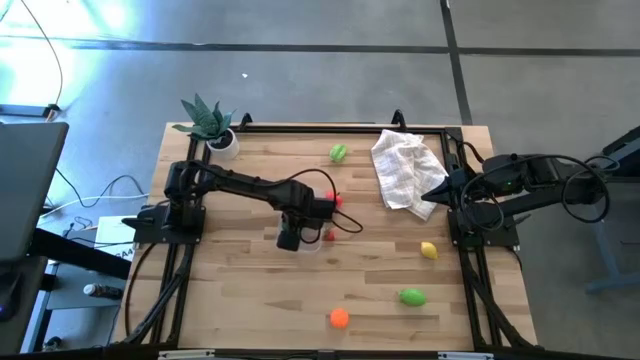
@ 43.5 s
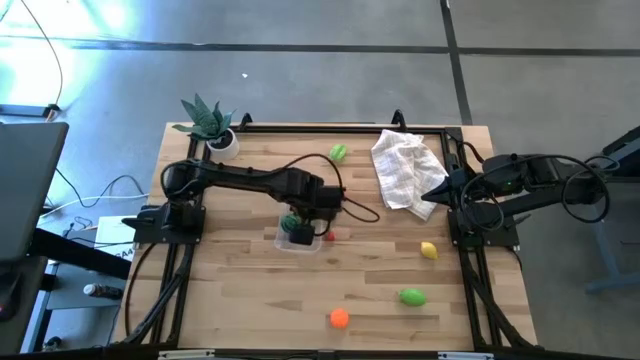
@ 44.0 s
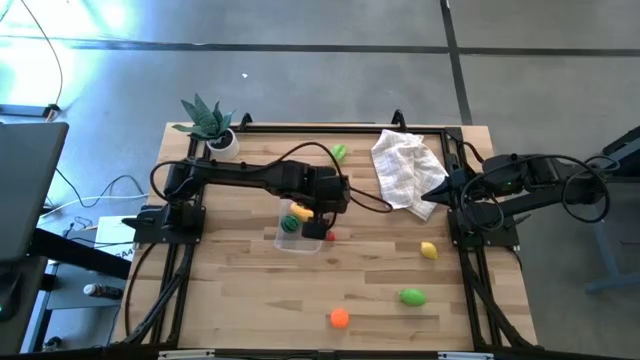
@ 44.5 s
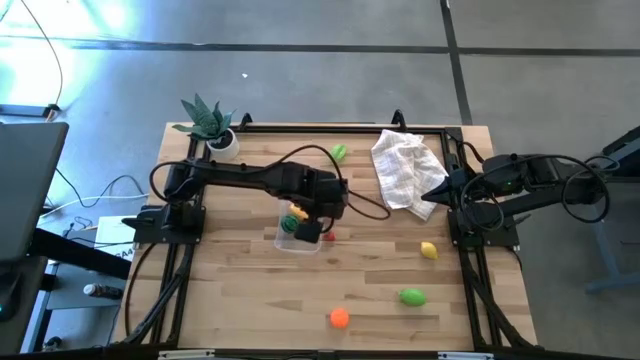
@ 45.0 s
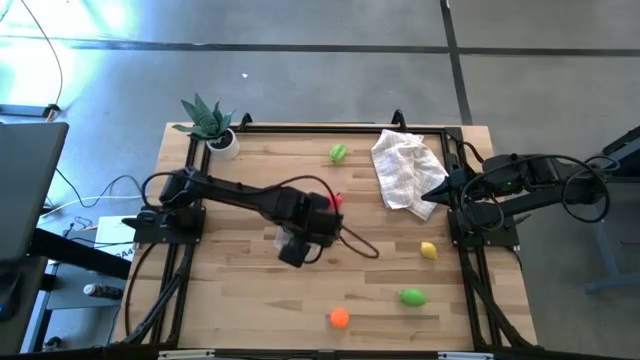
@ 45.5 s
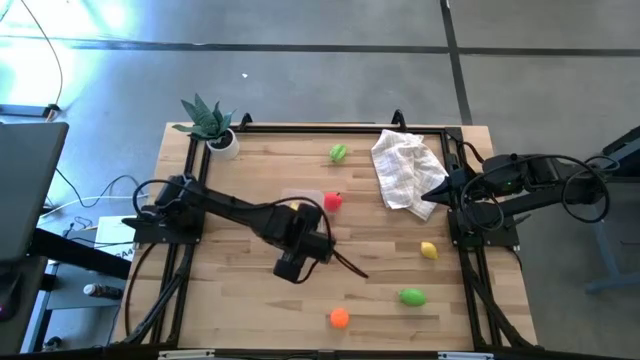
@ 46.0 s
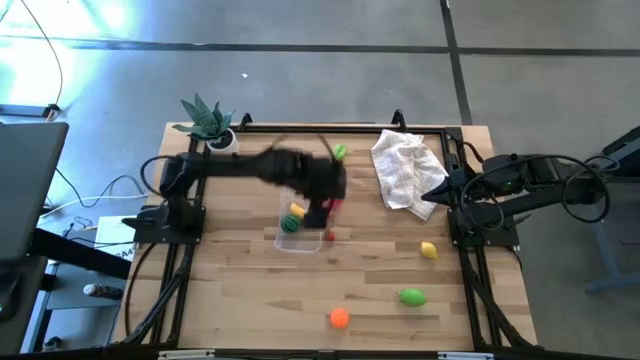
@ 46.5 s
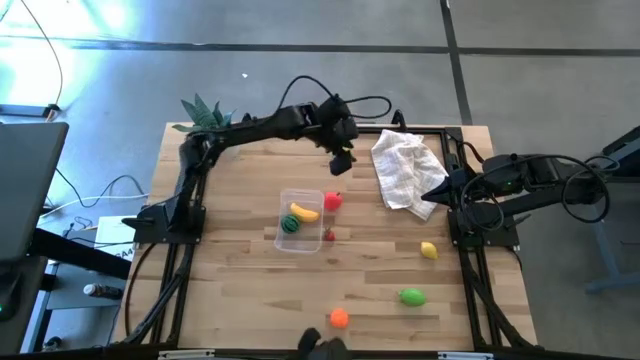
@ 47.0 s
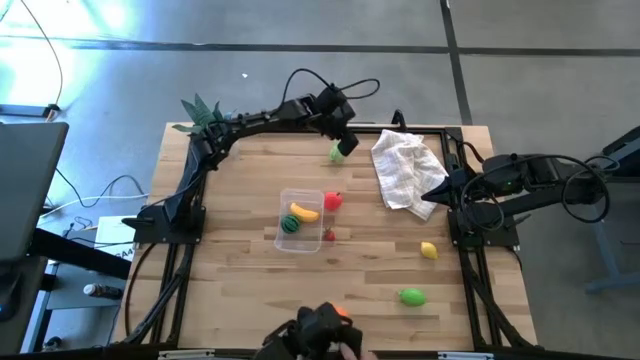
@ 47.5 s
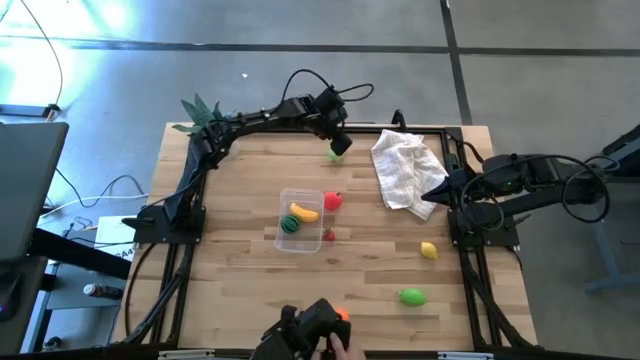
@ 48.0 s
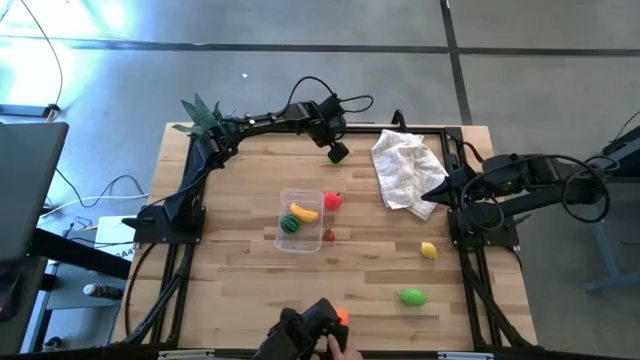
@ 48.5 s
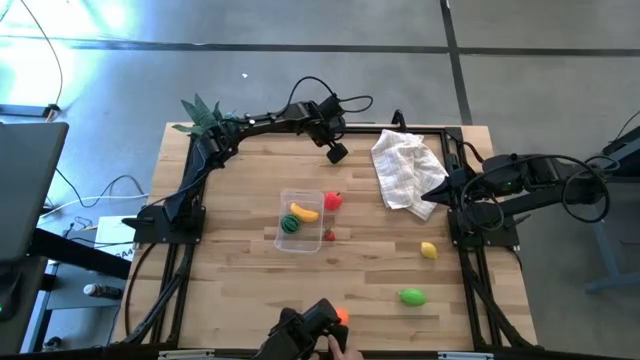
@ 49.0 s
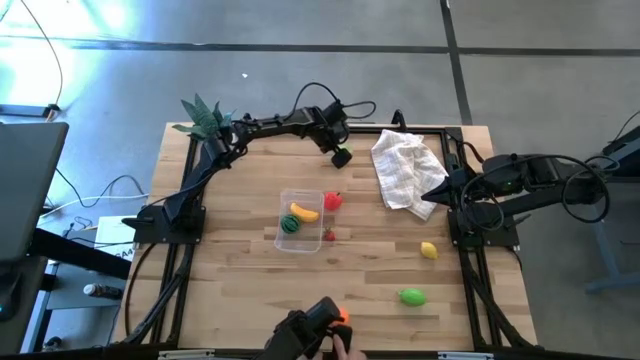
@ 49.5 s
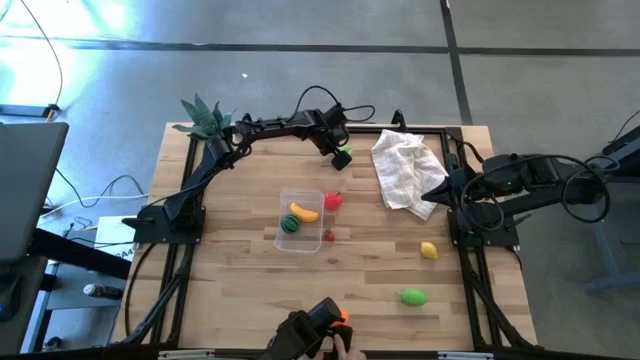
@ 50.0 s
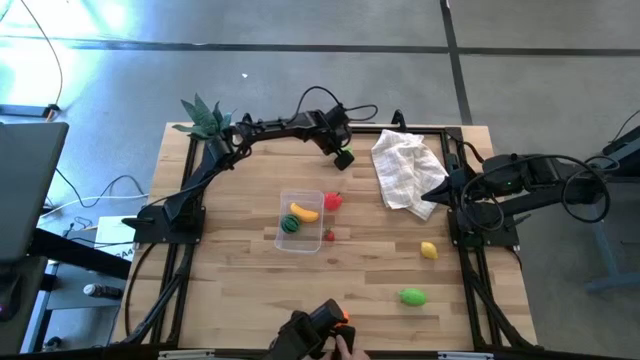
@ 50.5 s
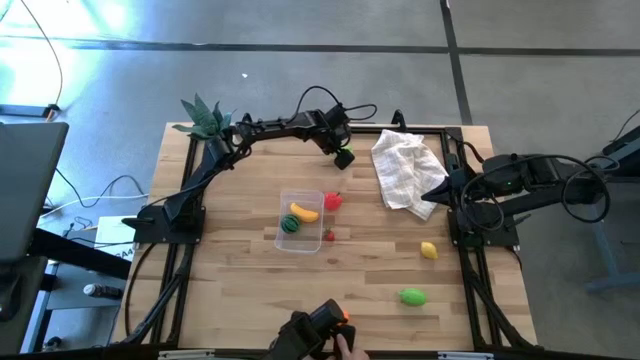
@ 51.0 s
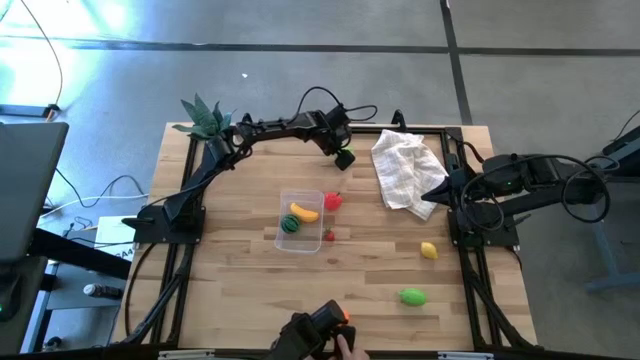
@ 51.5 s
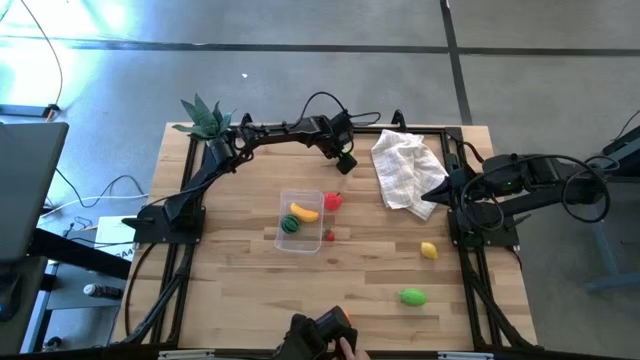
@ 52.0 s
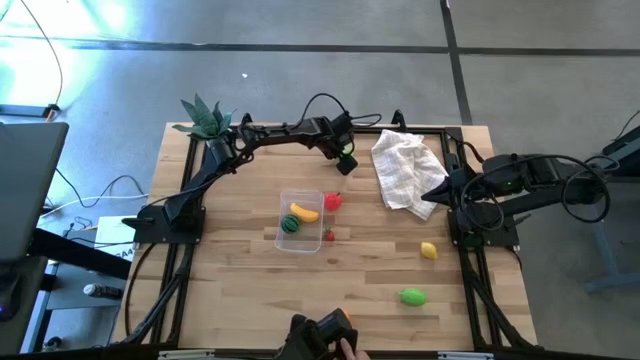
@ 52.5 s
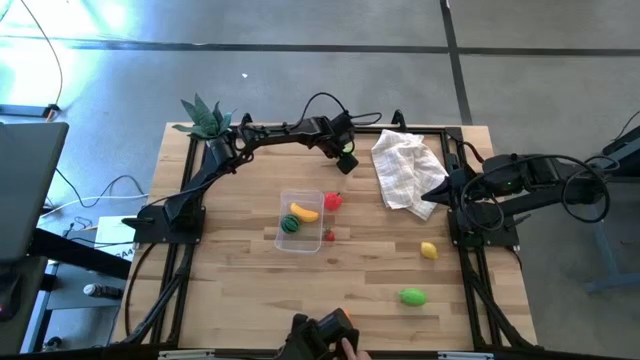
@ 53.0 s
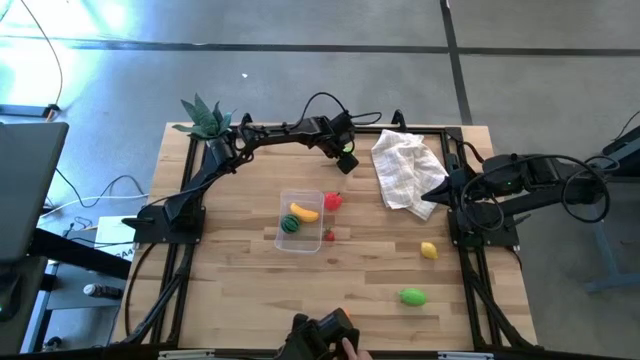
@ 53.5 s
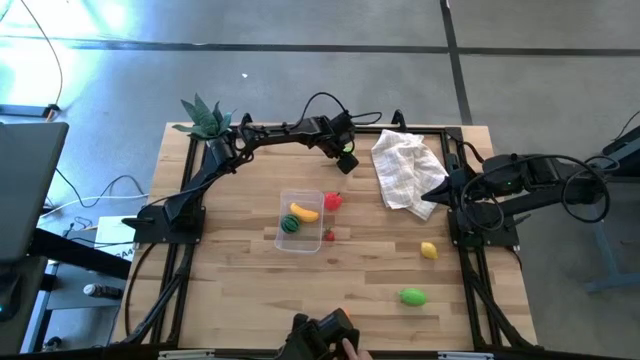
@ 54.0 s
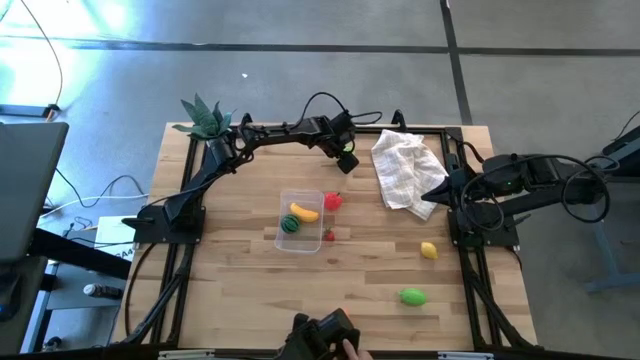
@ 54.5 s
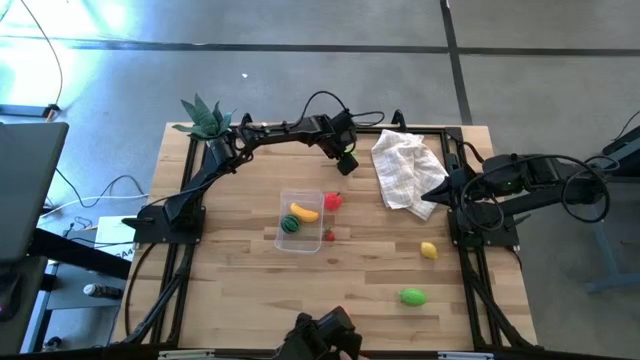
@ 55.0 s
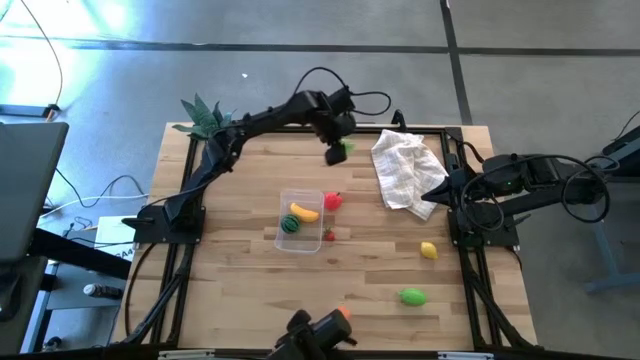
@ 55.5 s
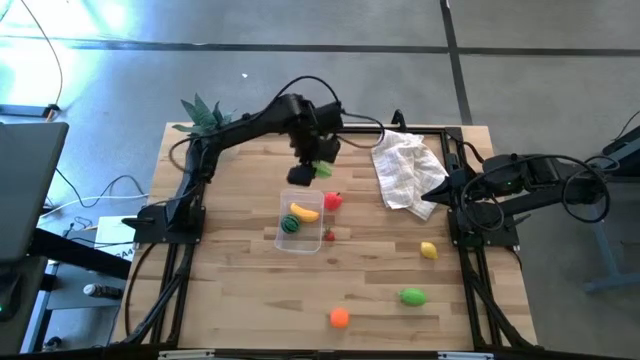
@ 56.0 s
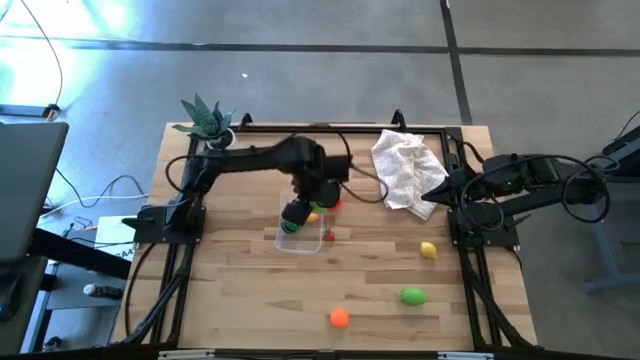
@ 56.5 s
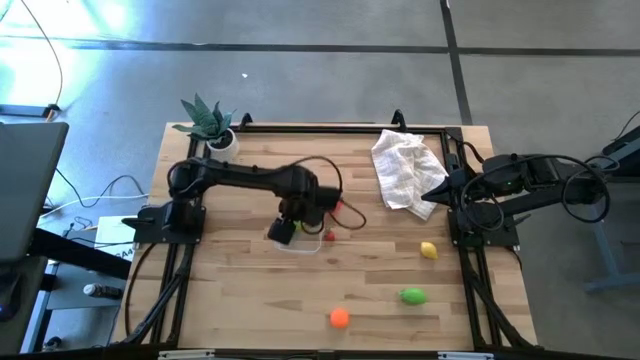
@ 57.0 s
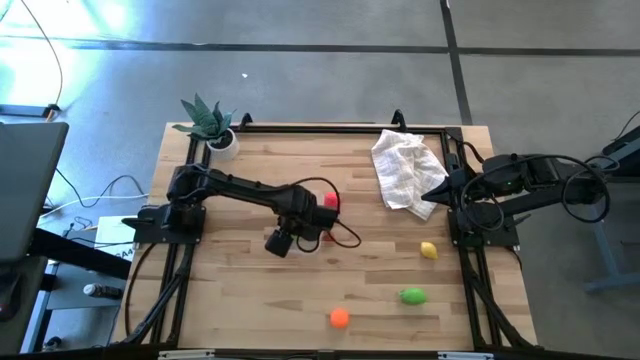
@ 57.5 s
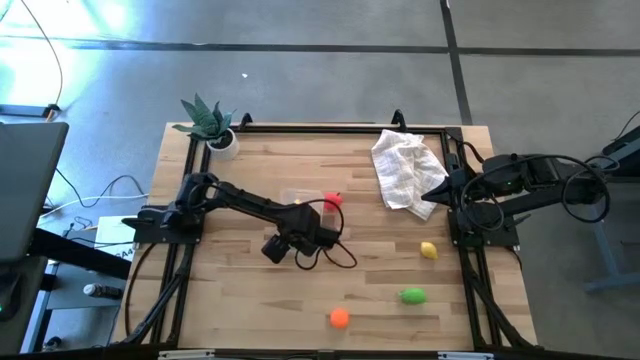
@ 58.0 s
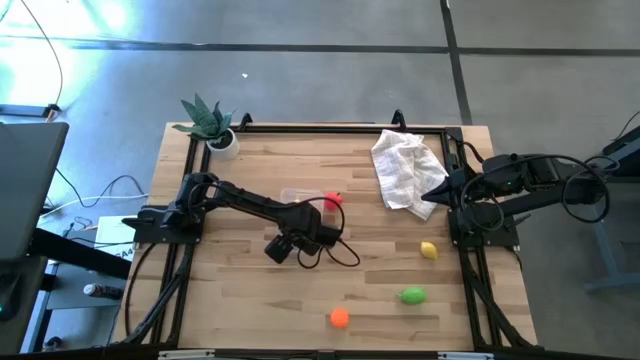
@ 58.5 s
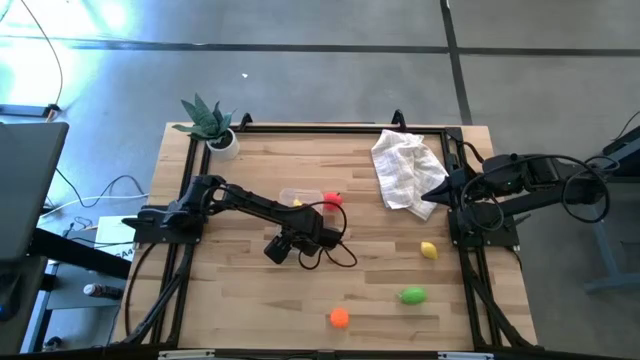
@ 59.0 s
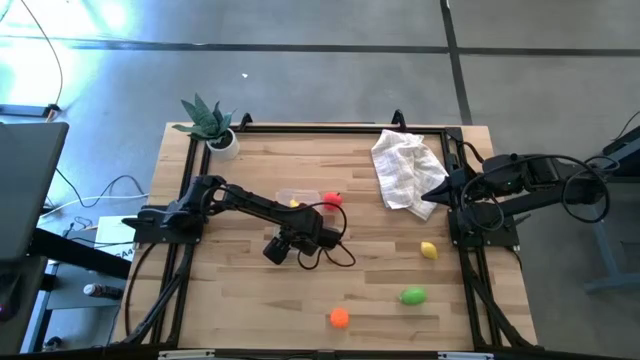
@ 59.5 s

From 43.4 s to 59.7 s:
Task: Pick and placing Produce into tupperware
Put the starfruit into the bin

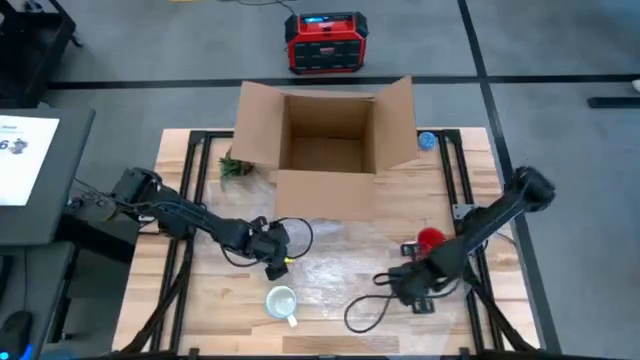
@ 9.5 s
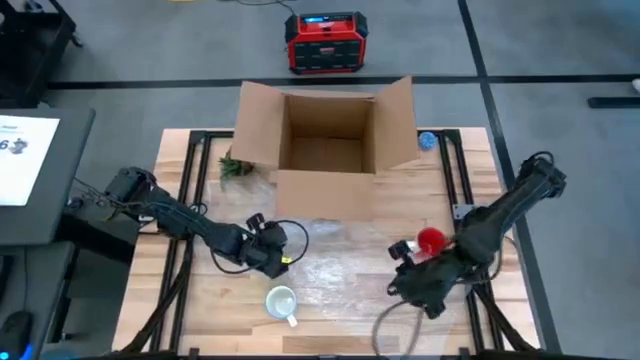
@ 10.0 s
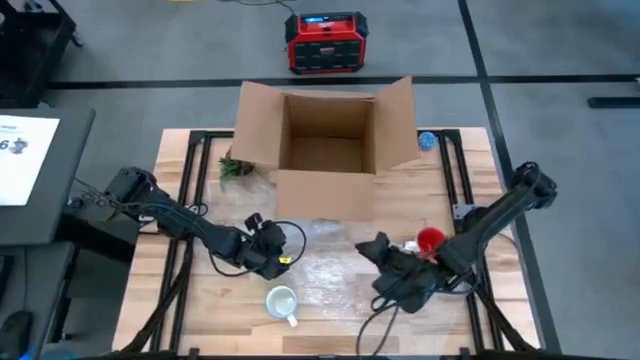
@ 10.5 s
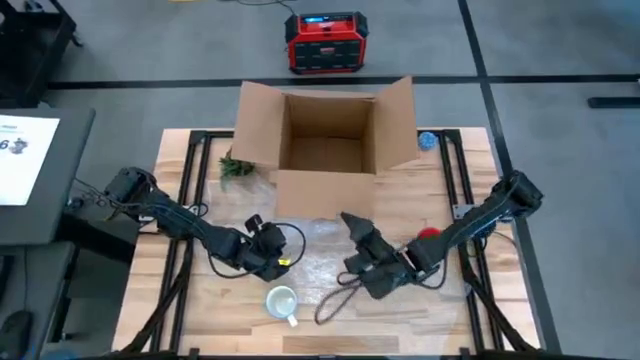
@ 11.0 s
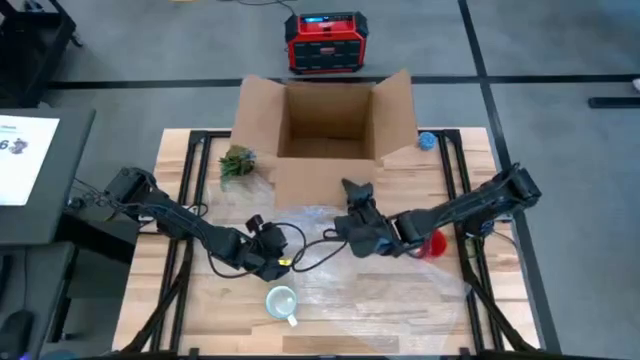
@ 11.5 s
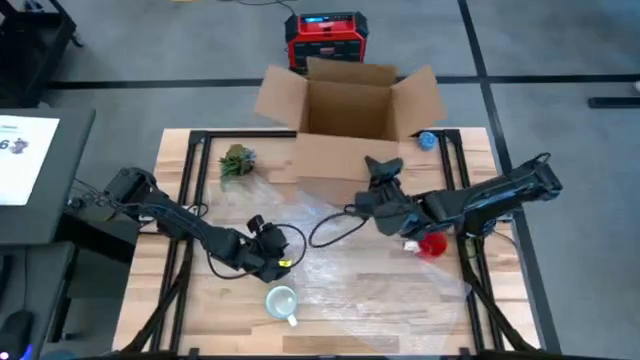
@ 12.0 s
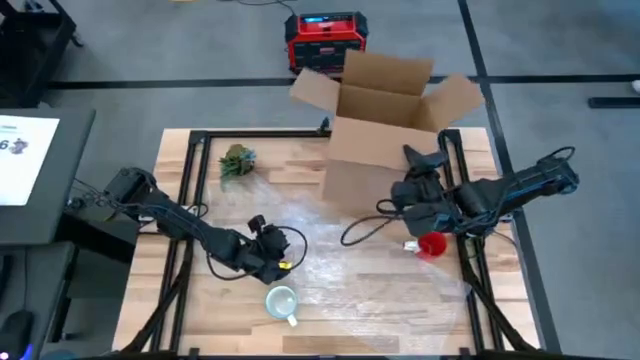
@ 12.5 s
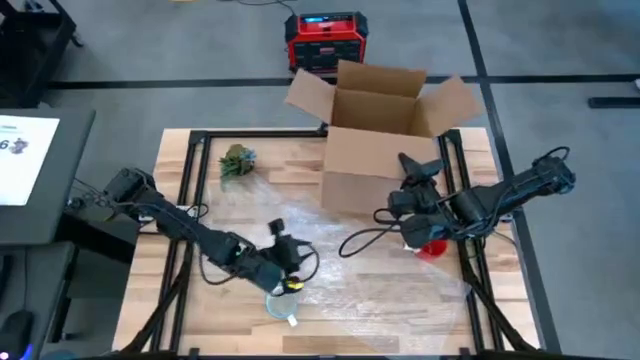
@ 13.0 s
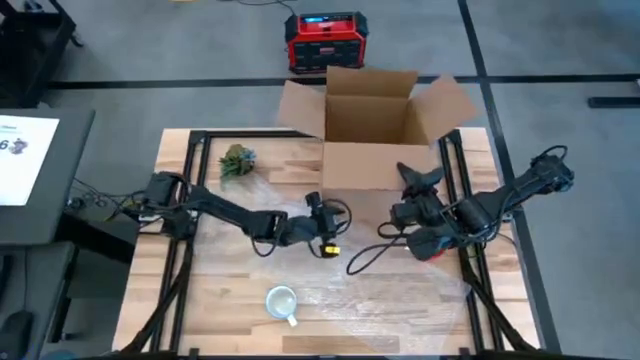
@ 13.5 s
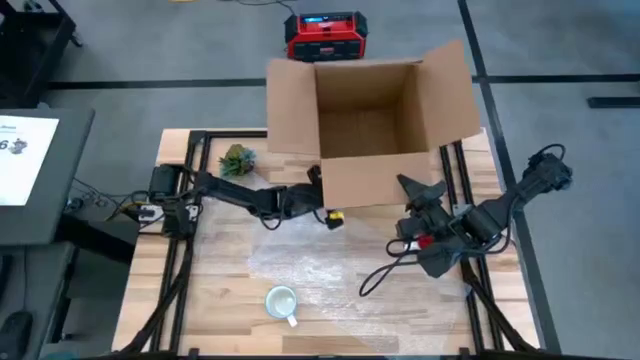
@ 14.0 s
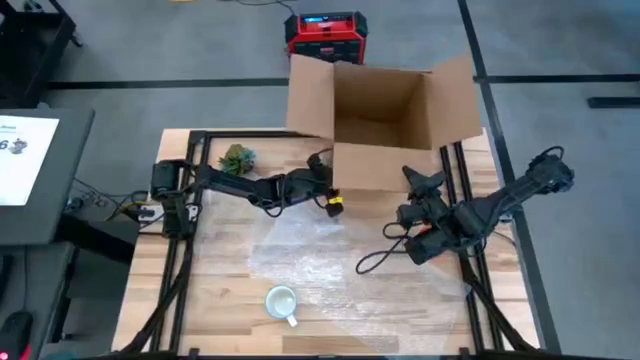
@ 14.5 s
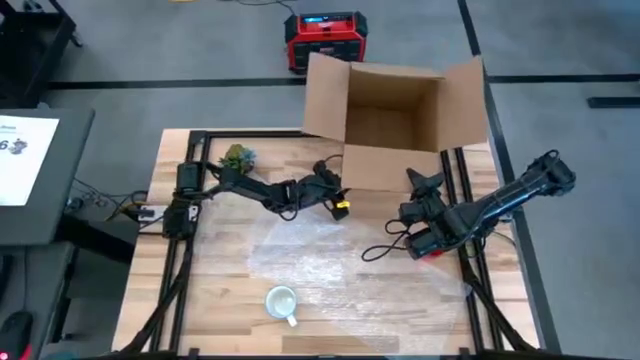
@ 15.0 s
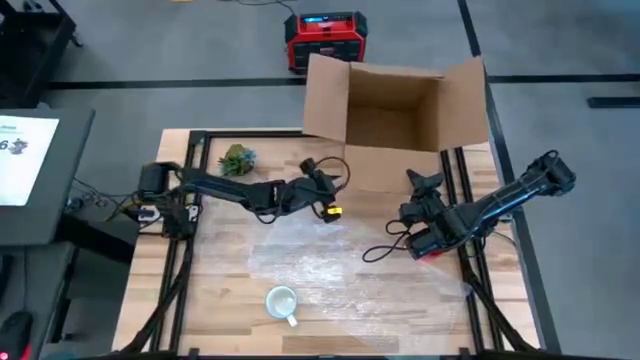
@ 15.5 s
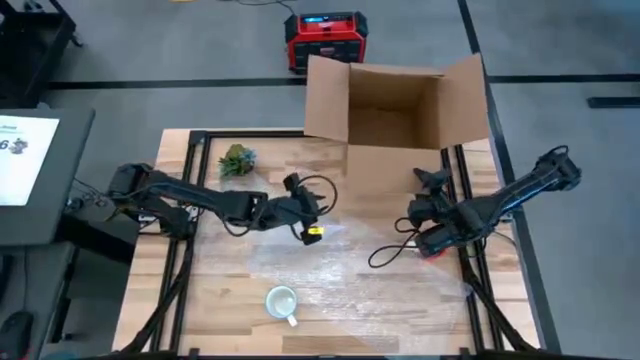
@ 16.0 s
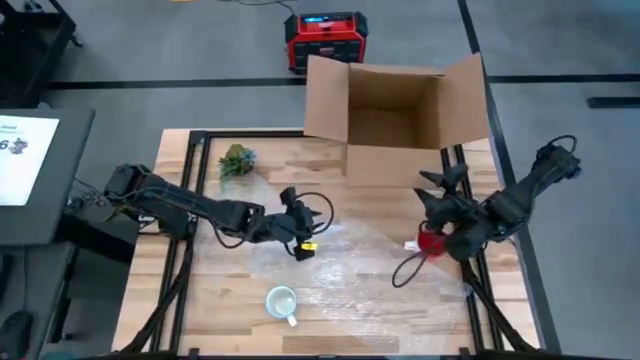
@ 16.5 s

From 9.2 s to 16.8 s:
Task: wrap mug
Adjust the brown cardboard box
